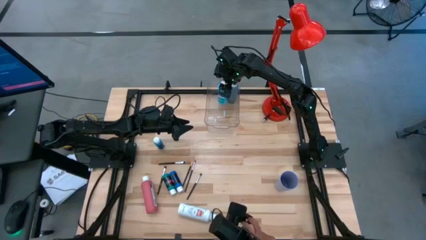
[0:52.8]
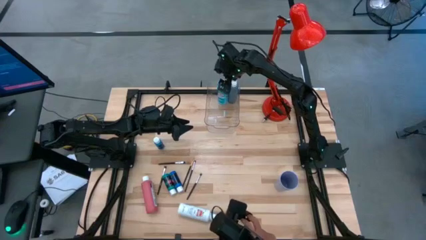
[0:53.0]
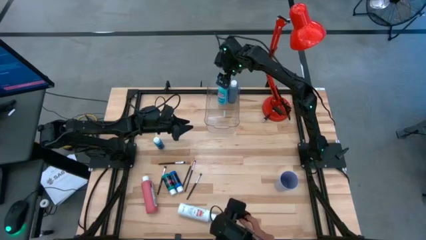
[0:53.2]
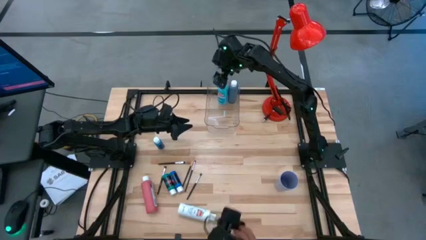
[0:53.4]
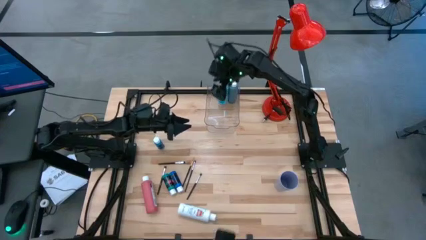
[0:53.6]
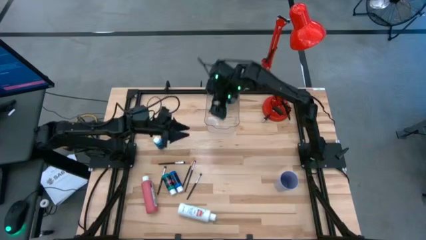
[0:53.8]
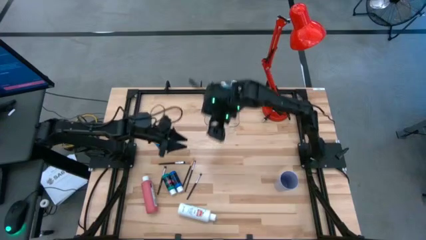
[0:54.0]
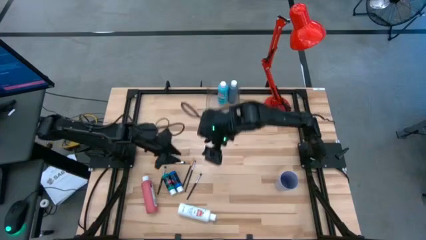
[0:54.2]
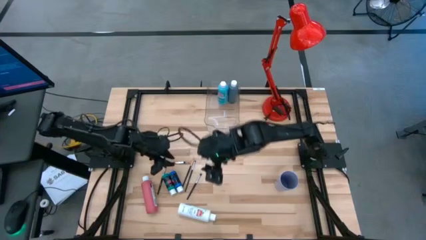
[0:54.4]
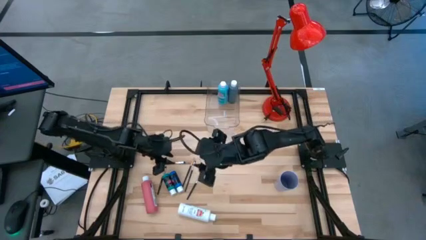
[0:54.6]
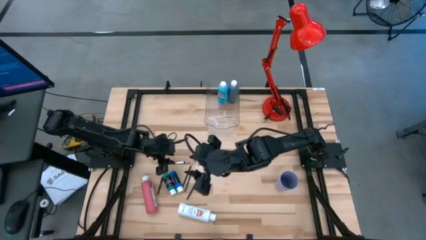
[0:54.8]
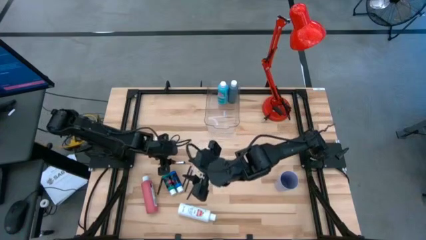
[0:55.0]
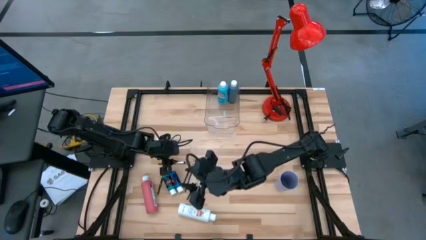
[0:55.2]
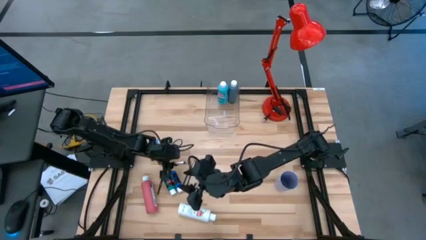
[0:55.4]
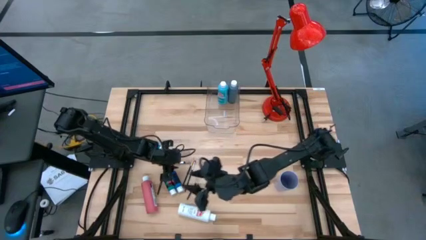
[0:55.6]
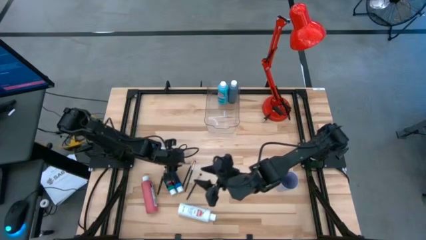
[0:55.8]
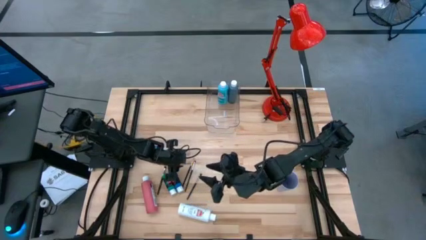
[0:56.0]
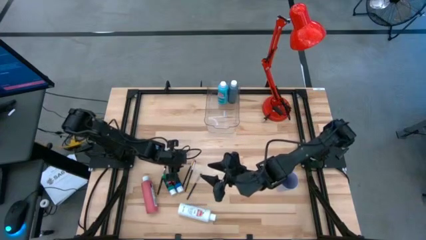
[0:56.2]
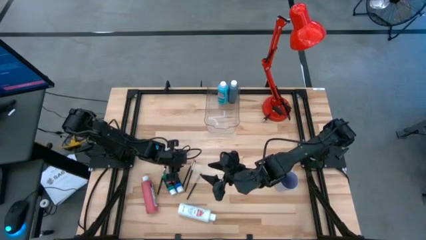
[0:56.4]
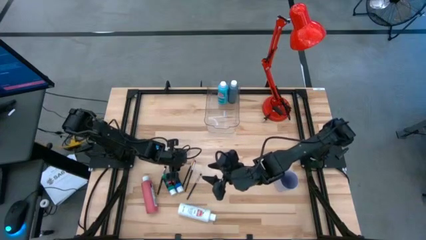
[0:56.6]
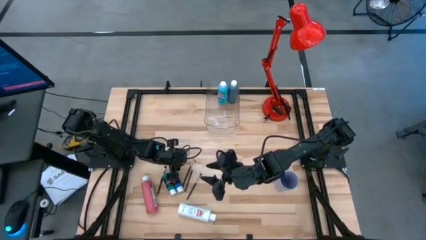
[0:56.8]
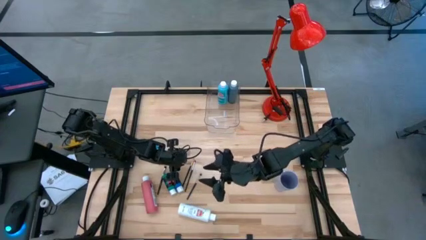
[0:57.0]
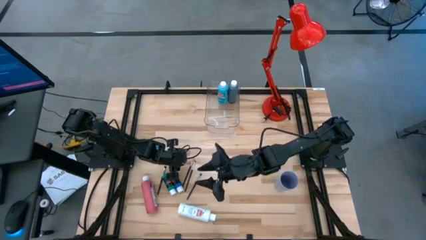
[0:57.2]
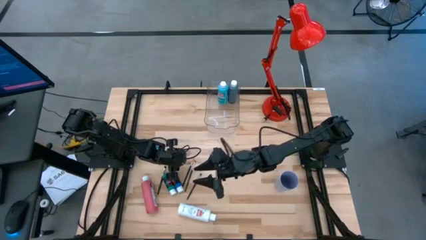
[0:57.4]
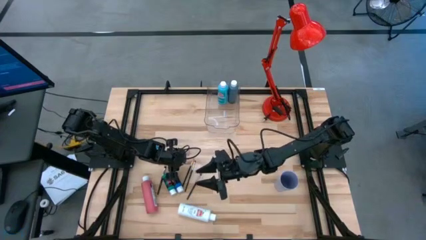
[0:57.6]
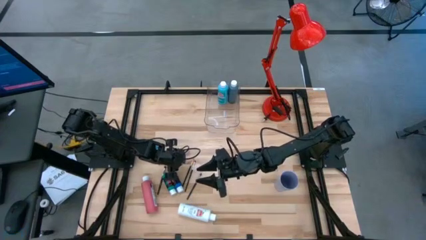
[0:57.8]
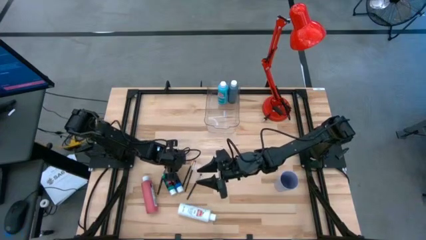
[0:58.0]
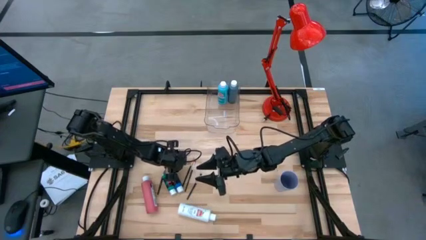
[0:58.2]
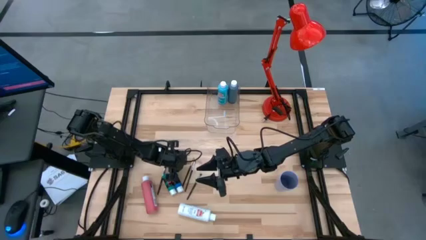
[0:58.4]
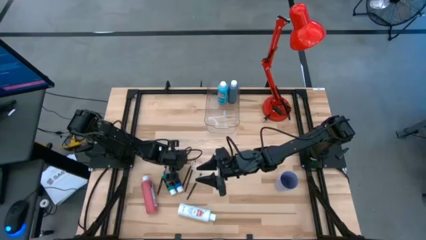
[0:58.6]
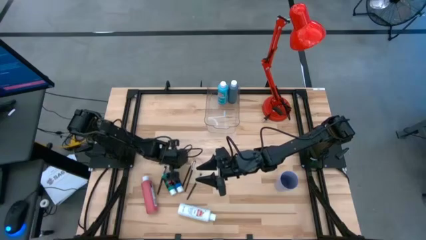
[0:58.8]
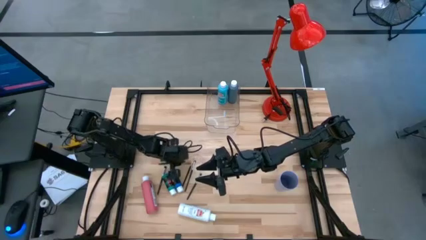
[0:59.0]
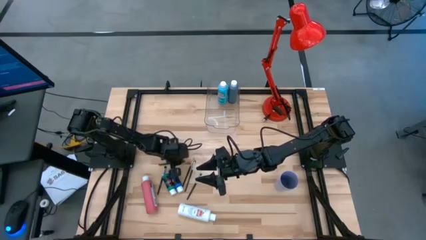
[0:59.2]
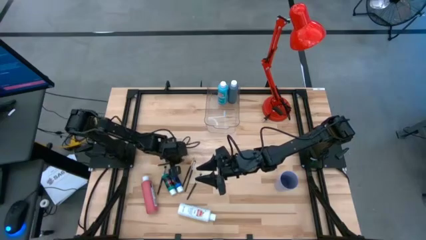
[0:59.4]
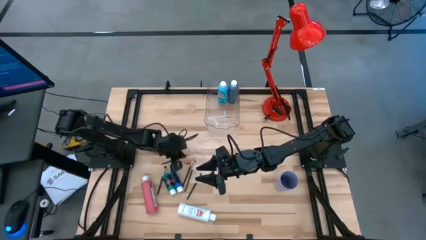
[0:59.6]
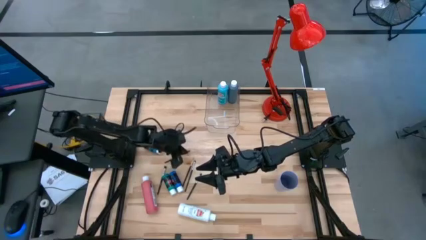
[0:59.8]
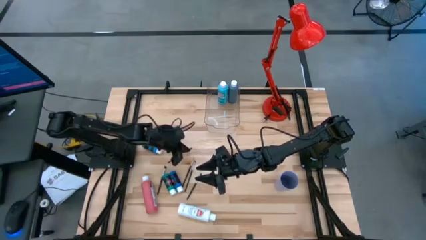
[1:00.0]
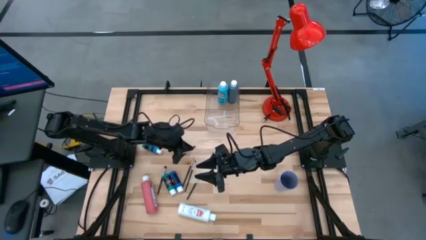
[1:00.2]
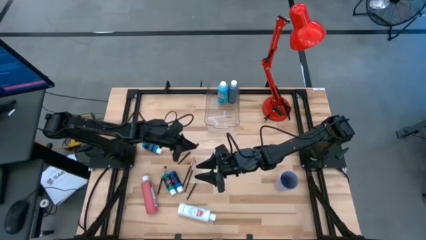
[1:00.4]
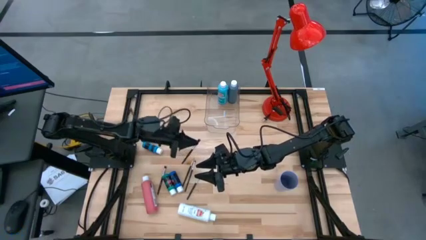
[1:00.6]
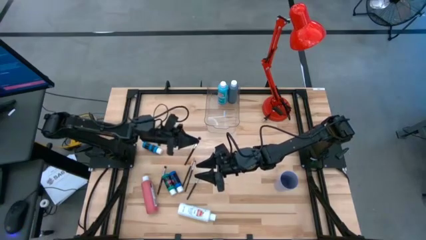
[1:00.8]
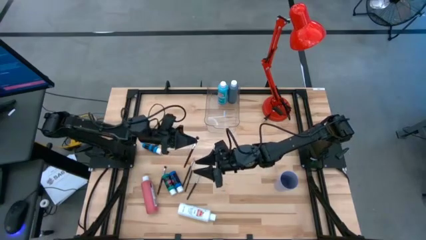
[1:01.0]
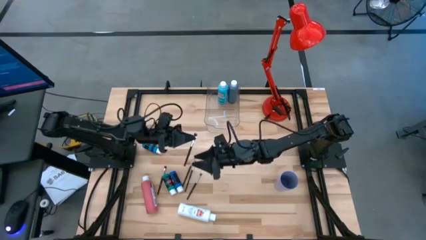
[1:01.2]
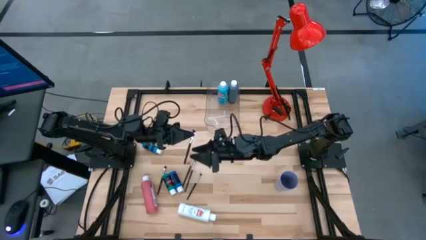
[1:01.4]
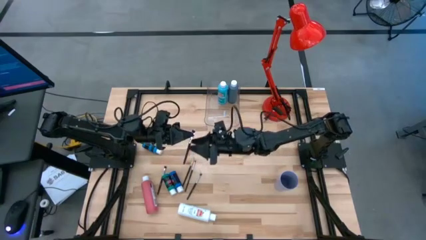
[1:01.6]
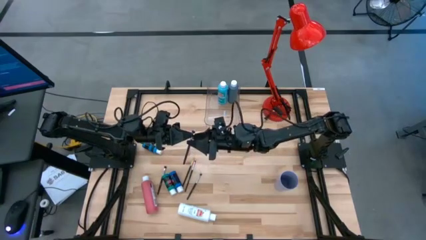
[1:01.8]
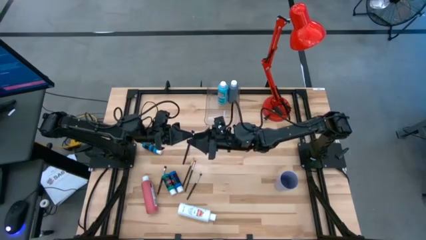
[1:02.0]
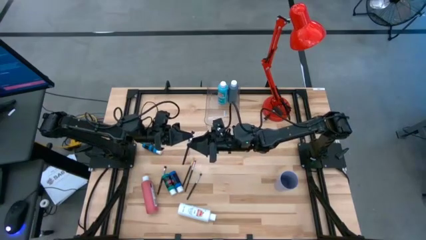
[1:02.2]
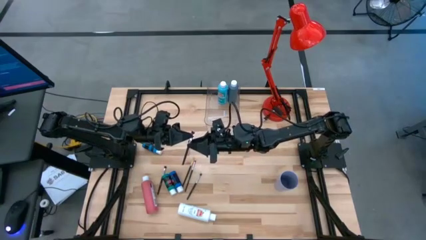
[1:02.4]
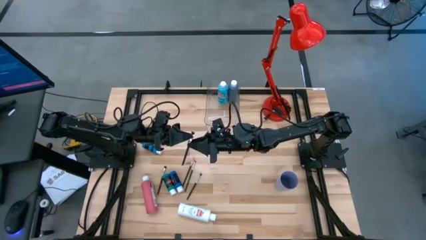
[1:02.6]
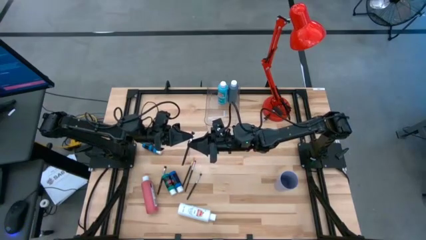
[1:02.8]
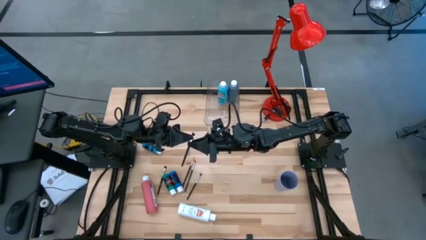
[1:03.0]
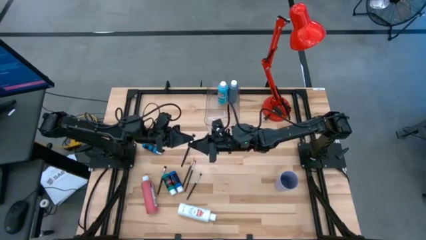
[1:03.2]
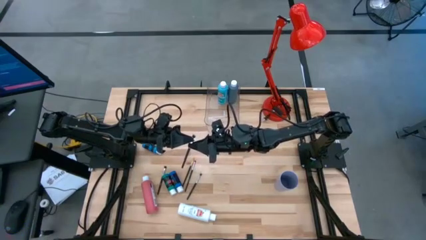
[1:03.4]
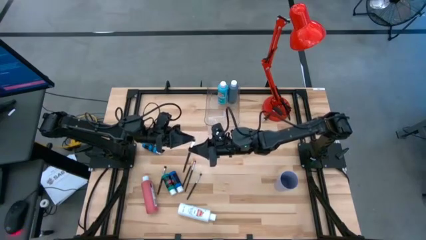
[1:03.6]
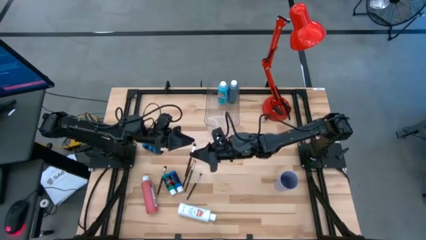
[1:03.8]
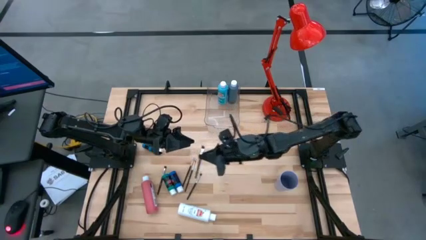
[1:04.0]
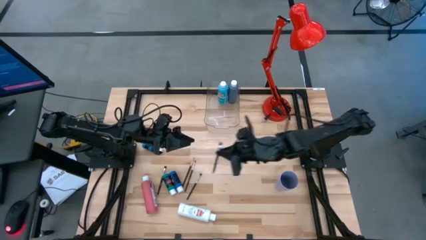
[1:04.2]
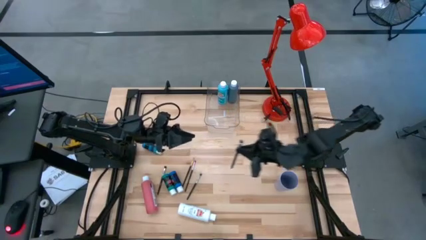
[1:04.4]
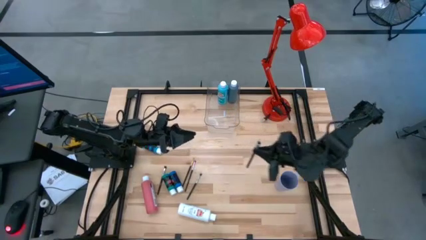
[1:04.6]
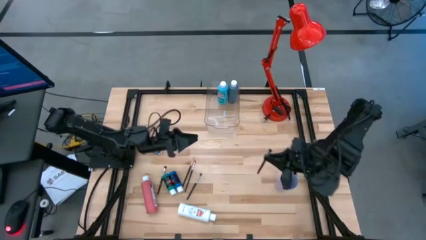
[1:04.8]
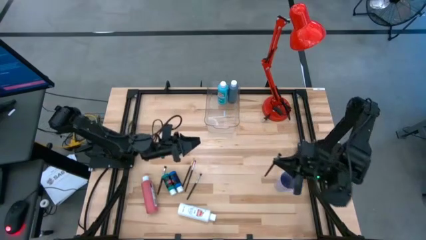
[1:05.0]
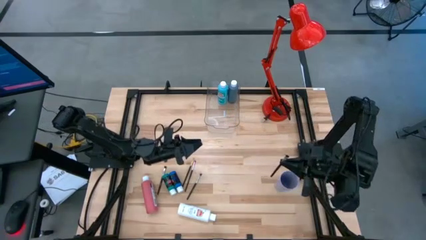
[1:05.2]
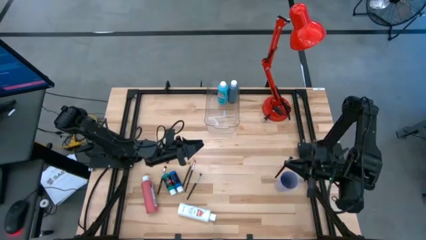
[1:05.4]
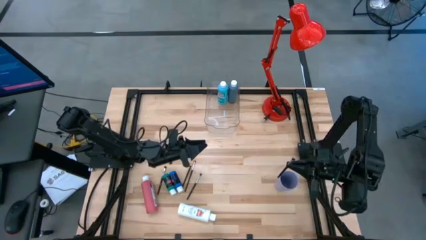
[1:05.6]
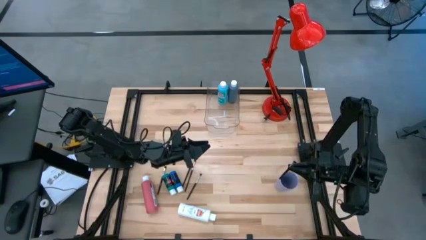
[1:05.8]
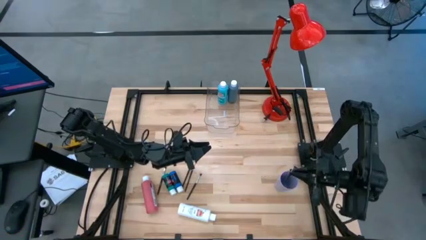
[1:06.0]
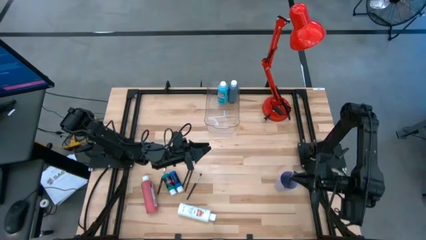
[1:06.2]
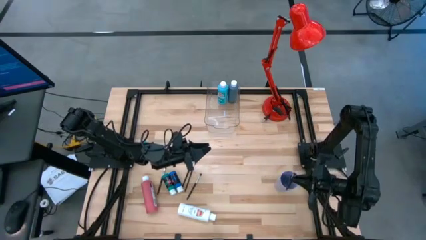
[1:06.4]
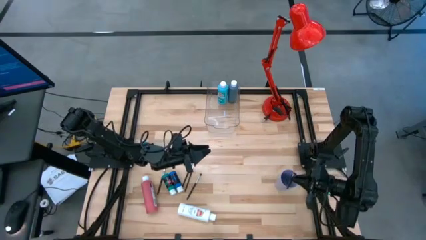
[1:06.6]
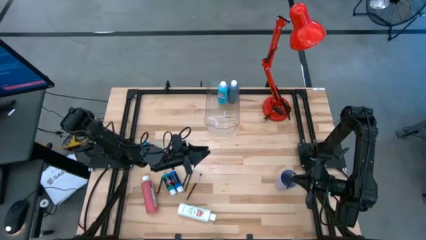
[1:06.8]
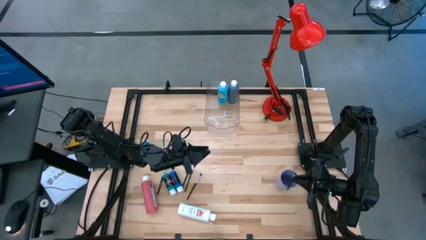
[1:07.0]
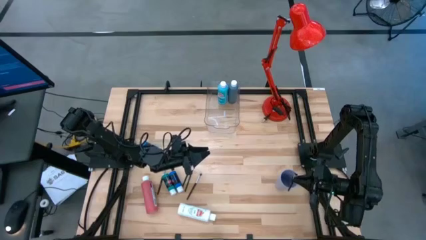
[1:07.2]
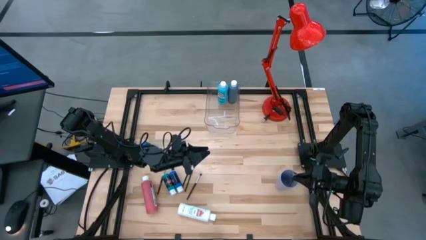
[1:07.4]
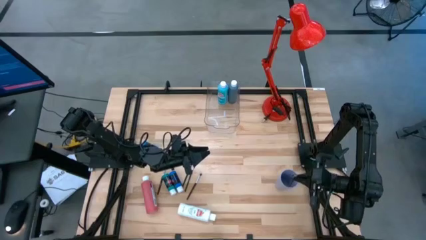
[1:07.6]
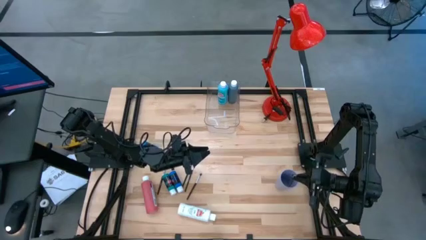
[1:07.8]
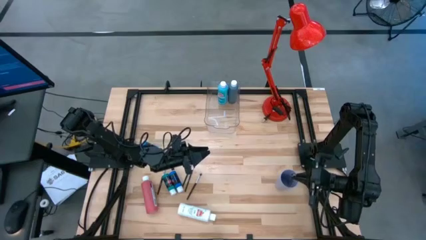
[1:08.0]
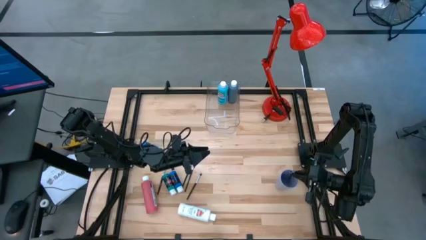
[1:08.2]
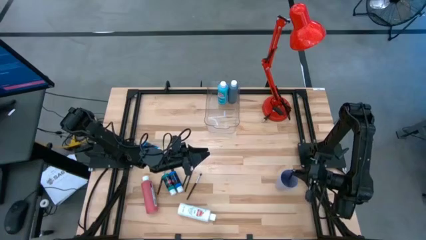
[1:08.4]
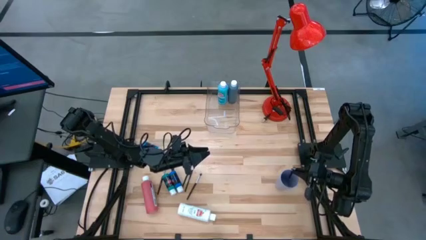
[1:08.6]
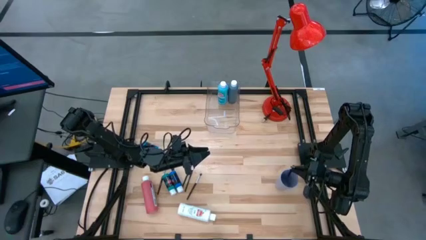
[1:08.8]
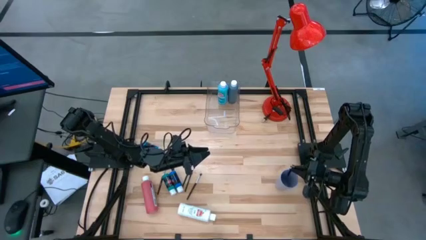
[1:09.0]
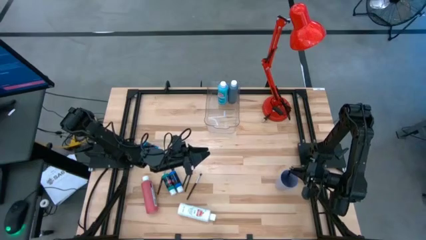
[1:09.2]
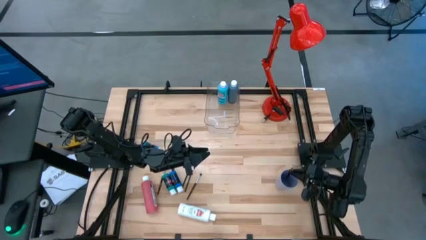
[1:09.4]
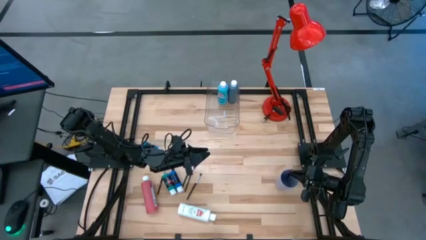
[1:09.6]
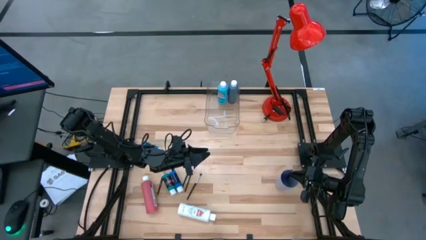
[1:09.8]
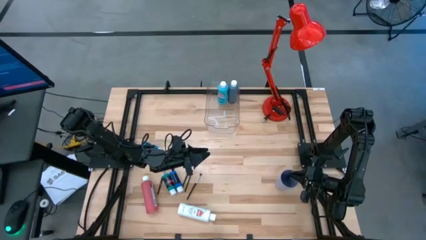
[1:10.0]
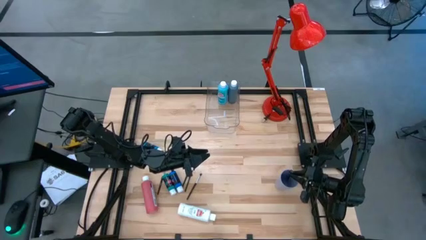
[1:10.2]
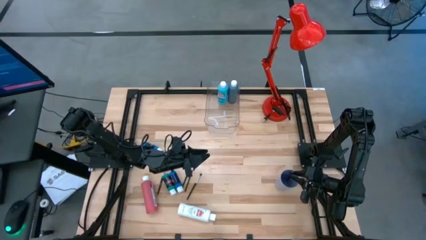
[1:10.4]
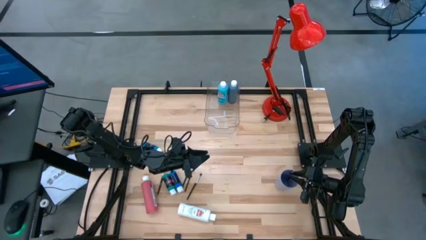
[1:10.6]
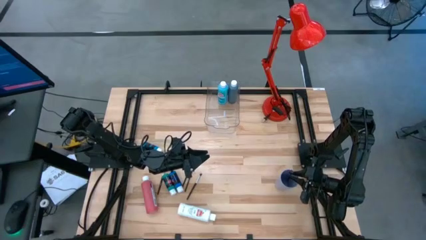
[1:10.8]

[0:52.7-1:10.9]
Task: Pick & Place Paint Supplies
Put the silver paintbrush into the purple cup
